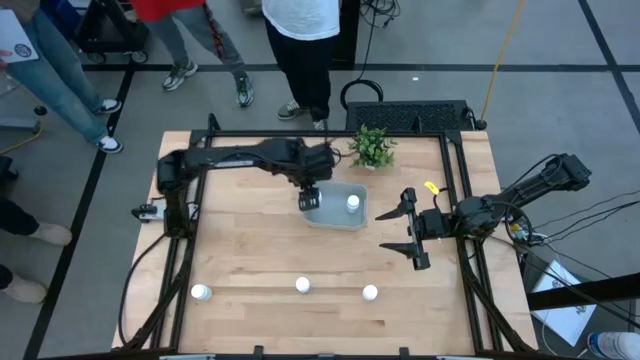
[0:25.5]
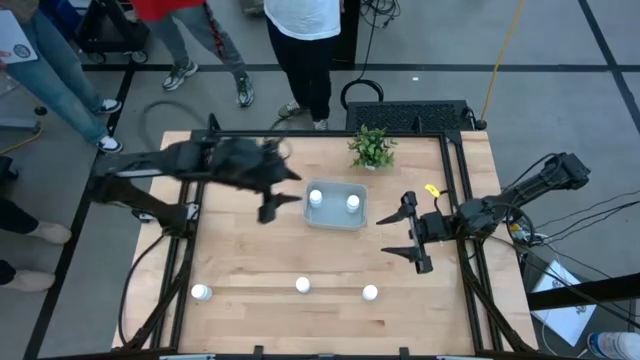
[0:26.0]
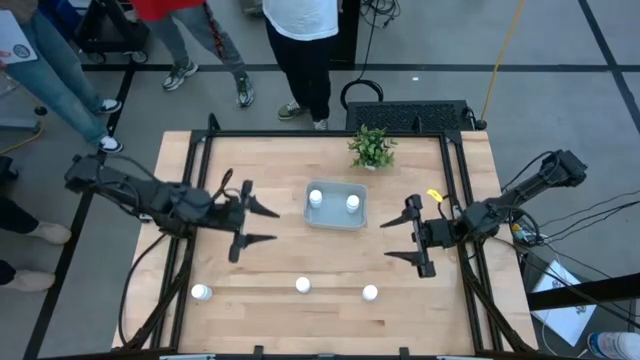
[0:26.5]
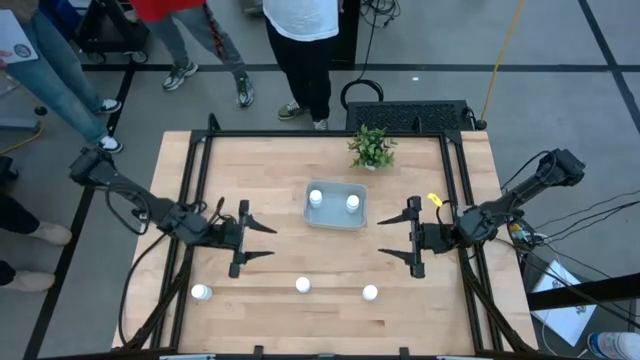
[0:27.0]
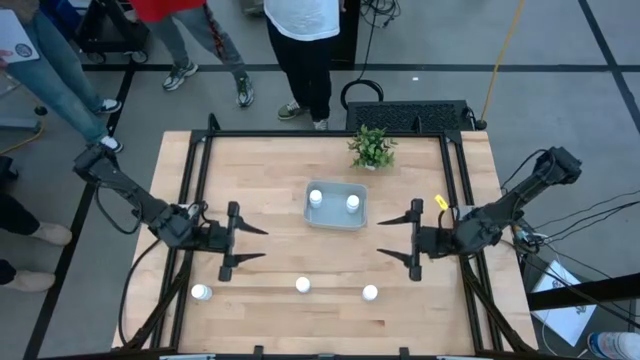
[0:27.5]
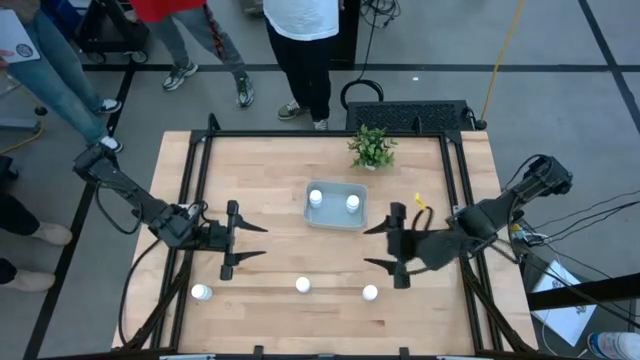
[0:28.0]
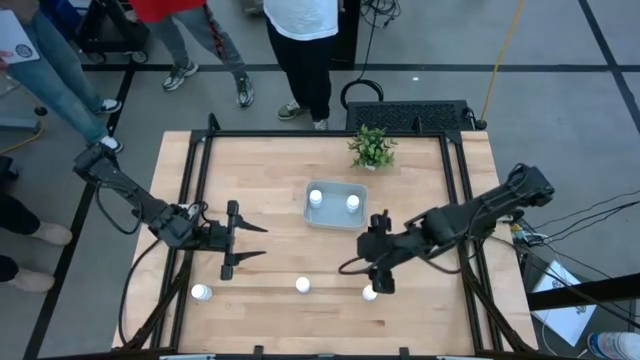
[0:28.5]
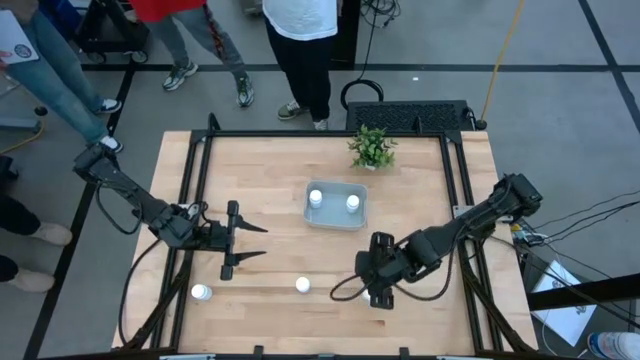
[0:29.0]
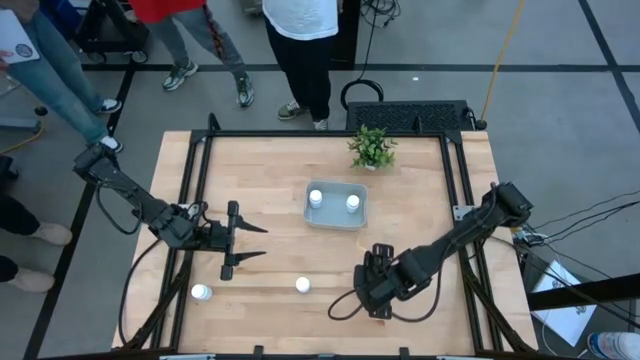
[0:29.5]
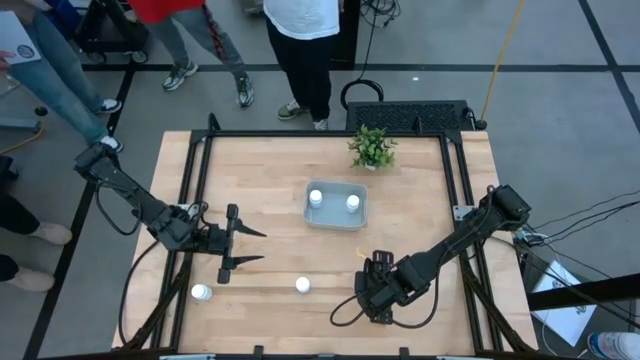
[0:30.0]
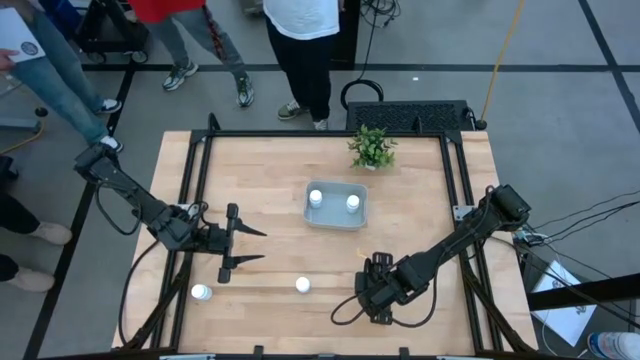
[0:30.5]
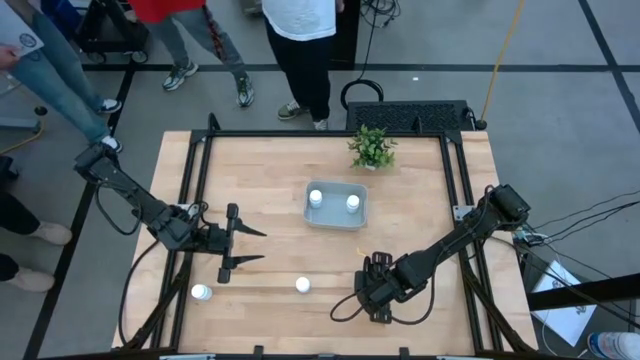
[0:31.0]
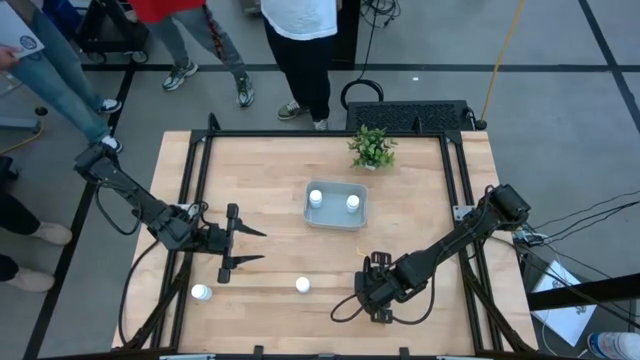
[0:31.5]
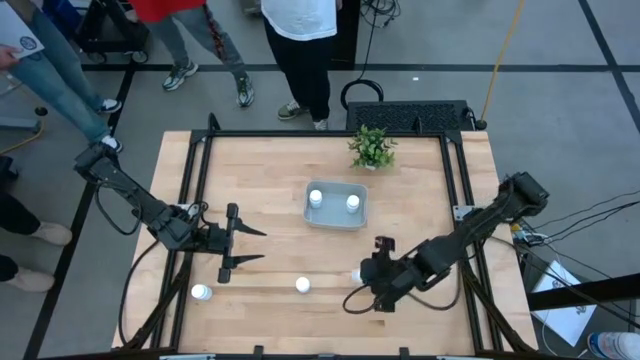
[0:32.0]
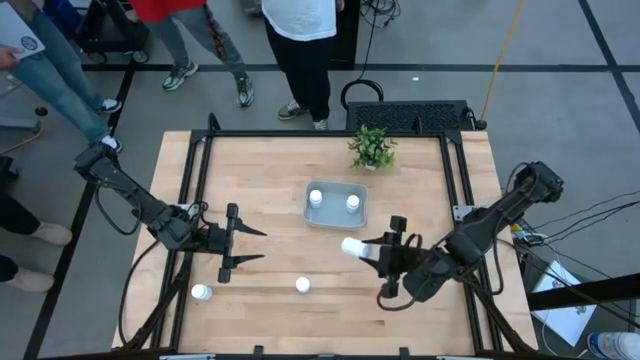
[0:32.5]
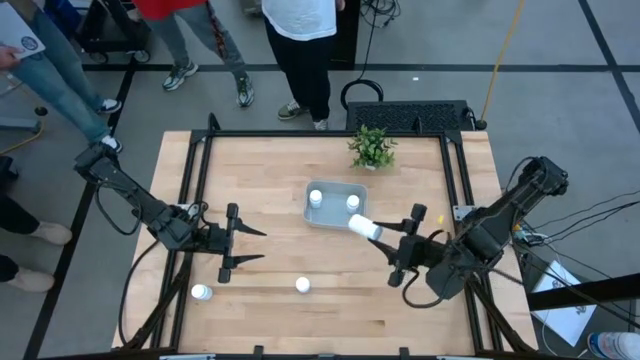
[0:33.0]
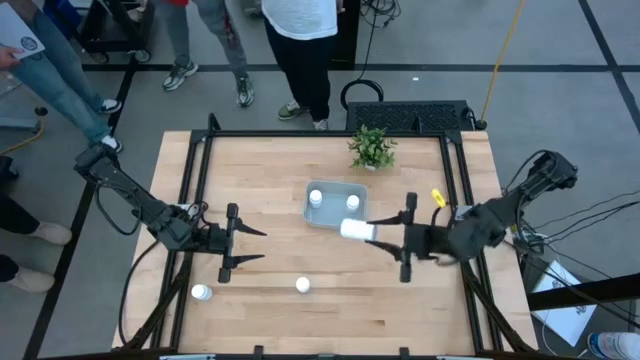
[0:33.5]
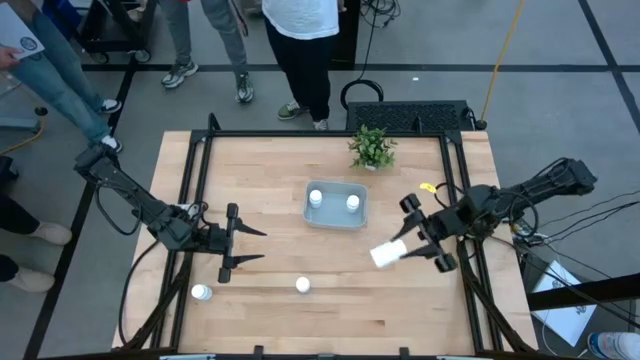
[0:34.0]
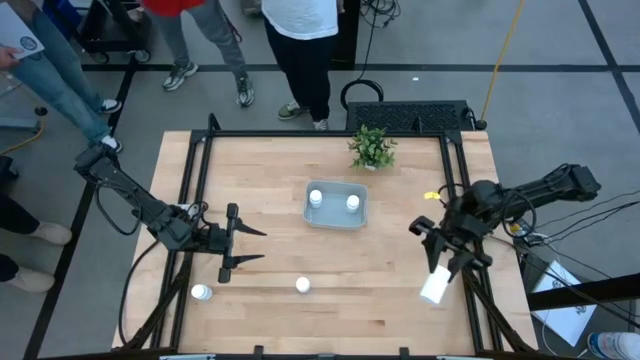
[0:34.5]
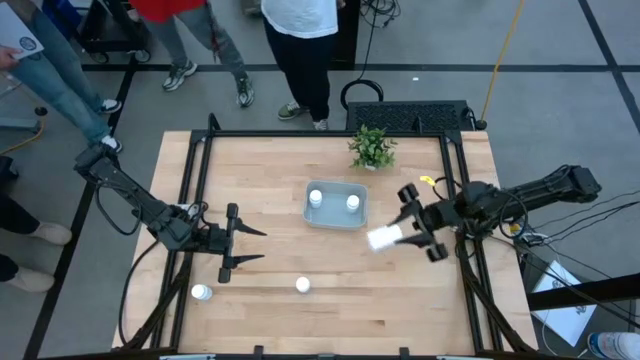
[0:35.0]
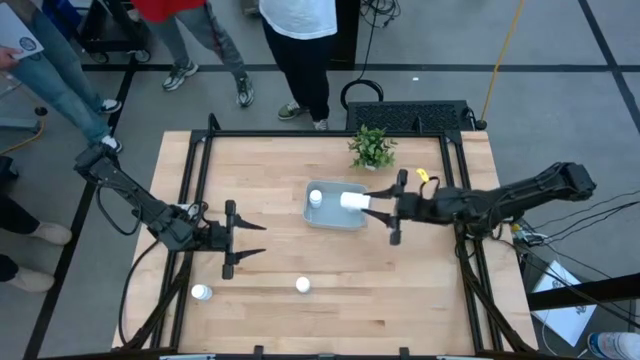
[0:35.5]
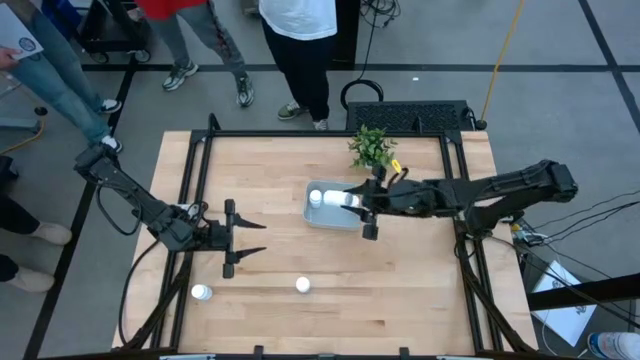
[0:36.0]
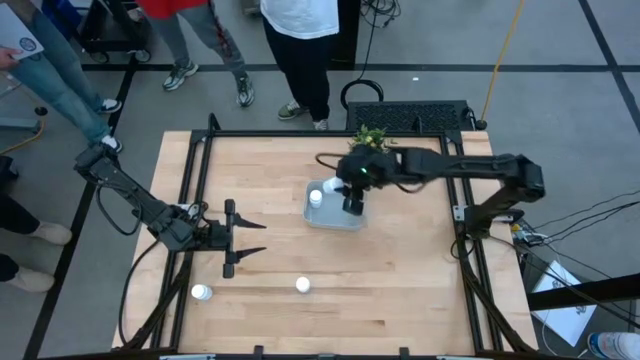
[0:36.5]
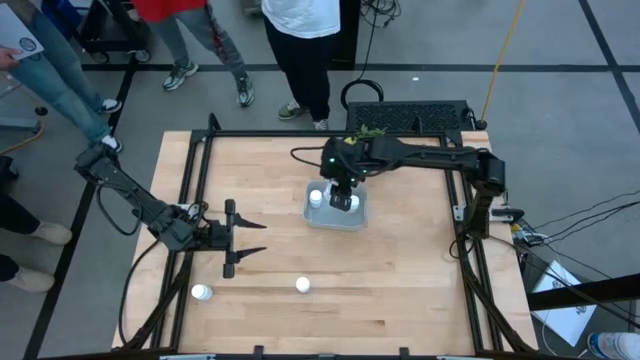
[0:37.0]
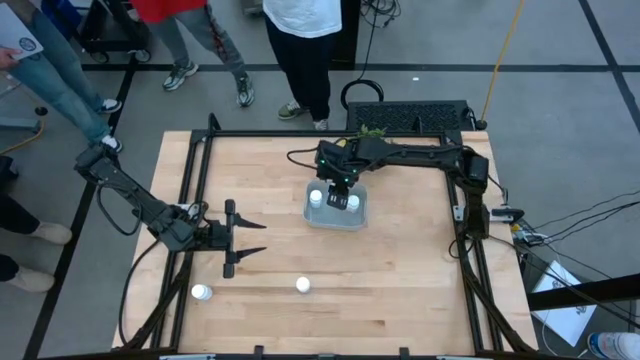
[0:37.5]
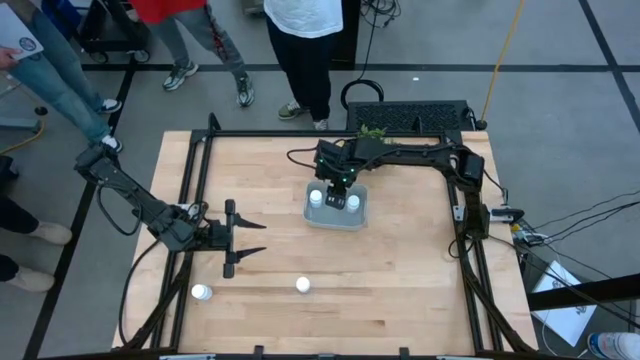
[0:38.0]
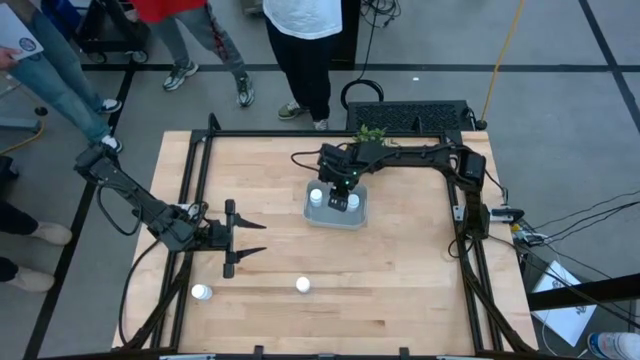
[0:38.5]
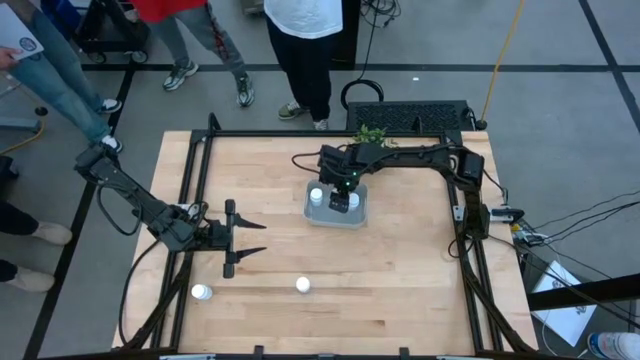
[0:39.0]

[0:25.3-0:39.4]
Task: Pick and place pill bottles into a basket
Put the white medicine bottle into the bin

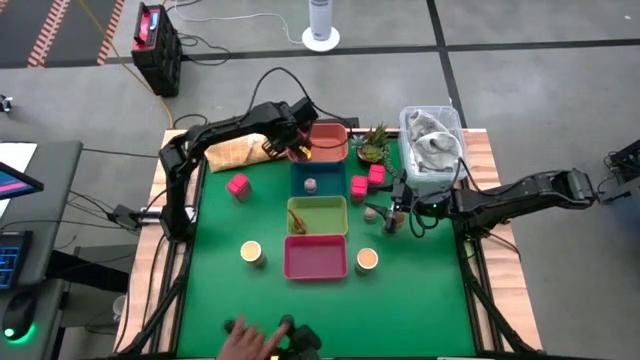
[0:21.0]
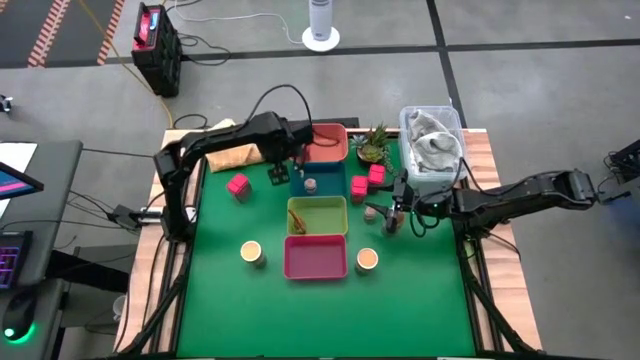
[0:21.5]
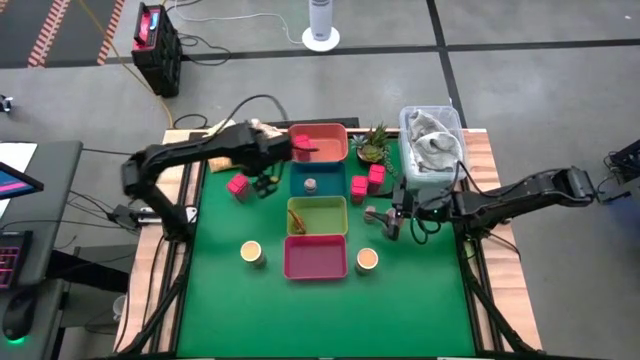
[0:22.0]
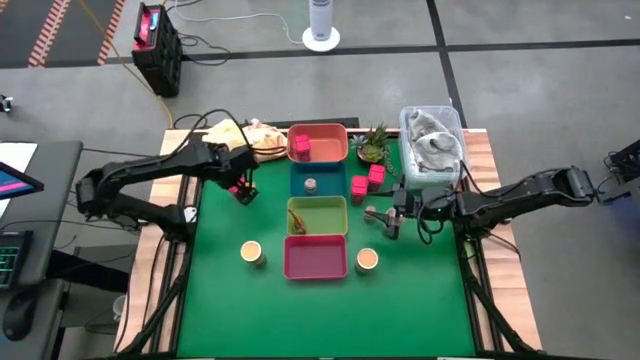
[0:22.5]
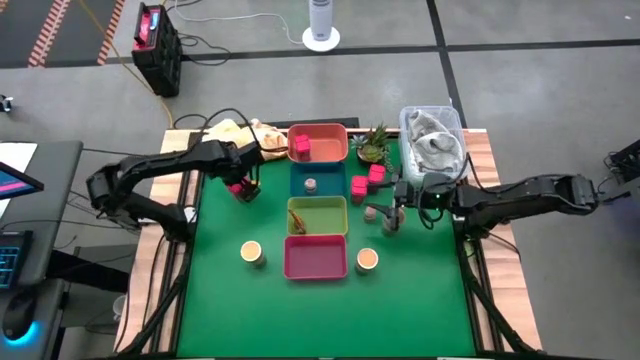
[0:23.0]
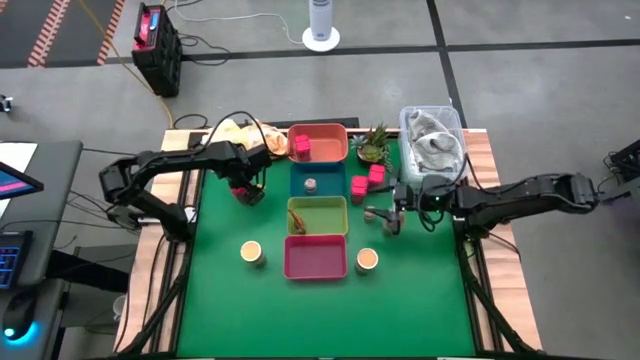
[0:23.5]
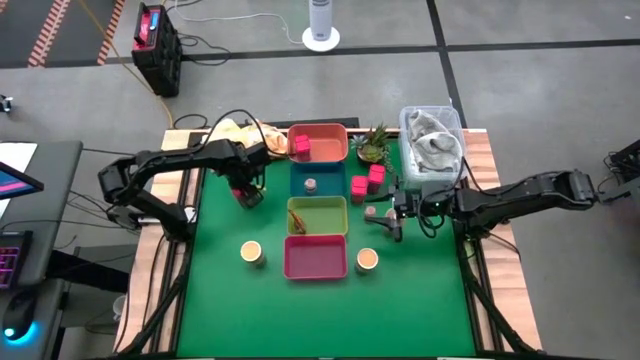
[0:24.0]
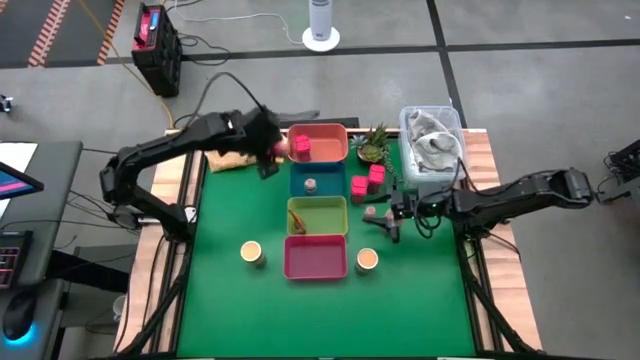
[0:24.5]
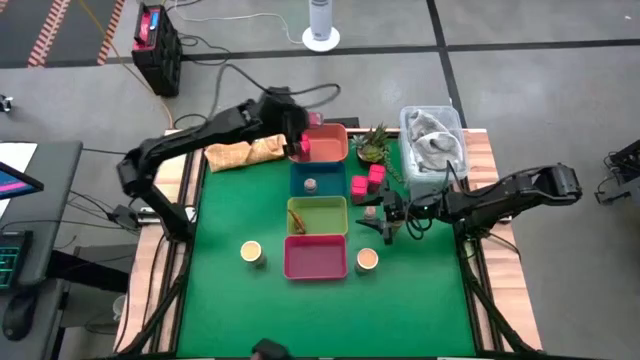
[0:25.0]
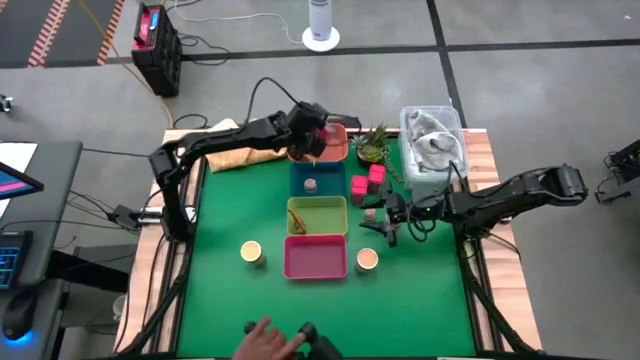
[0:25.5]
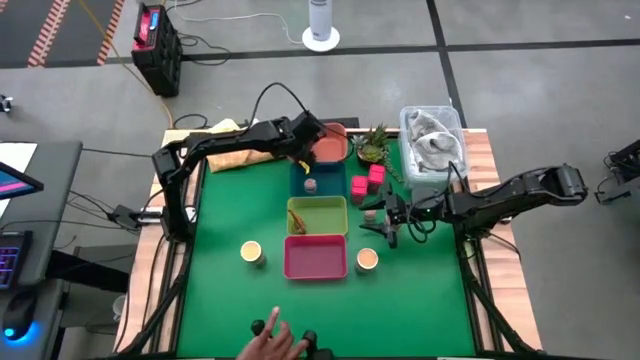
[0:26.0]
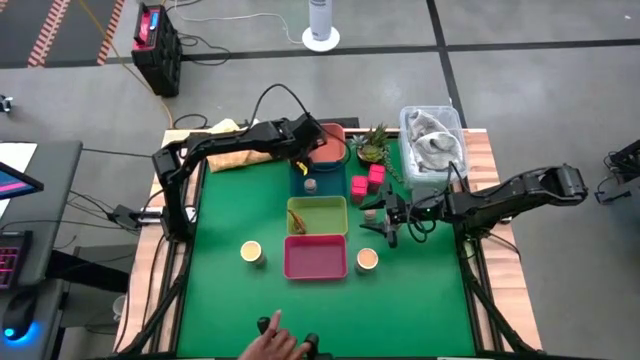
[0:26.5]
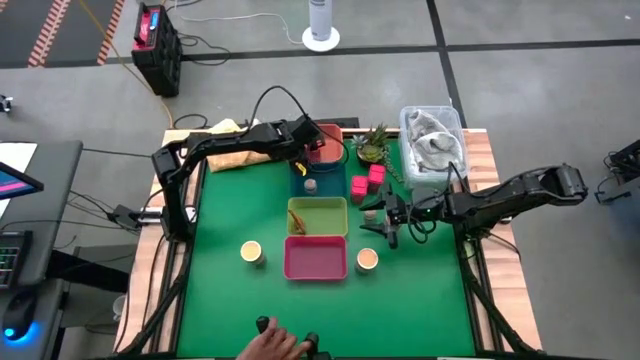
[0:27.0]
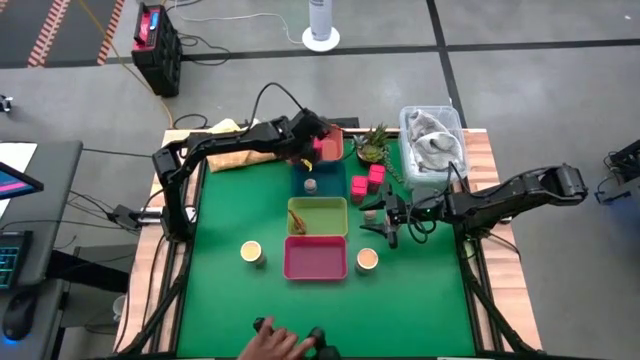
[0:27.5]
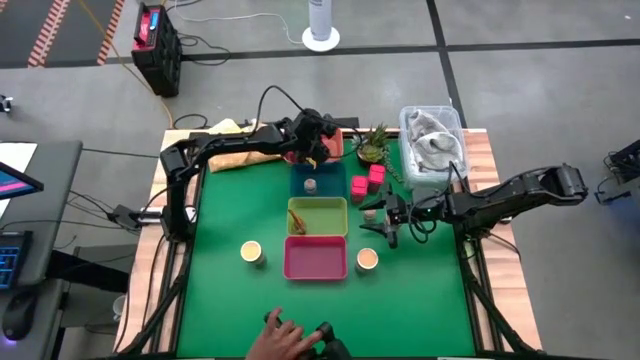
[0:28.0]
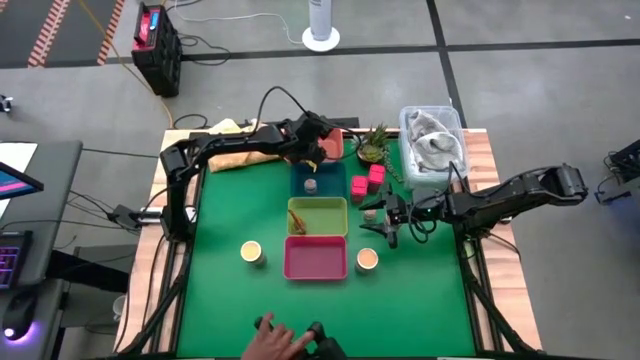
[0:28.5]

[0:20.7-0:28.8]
Task: Sort spices by type
Put the red seasoning can into the orange bin
